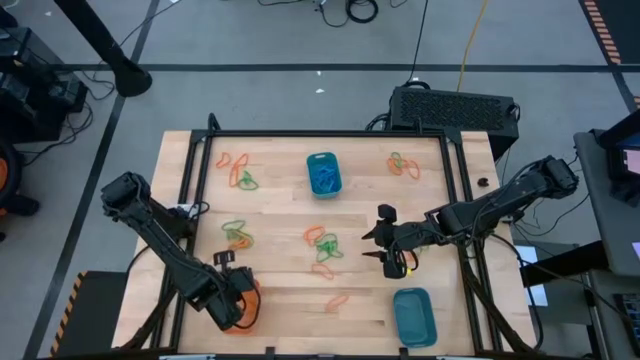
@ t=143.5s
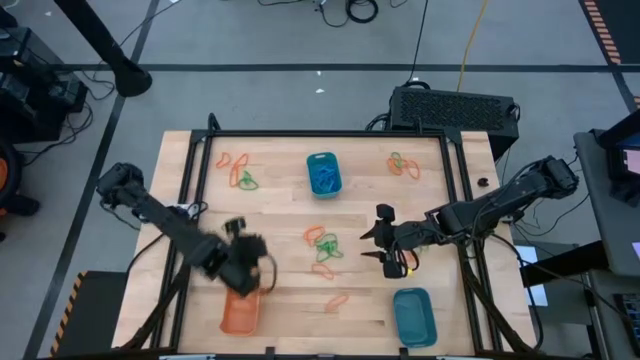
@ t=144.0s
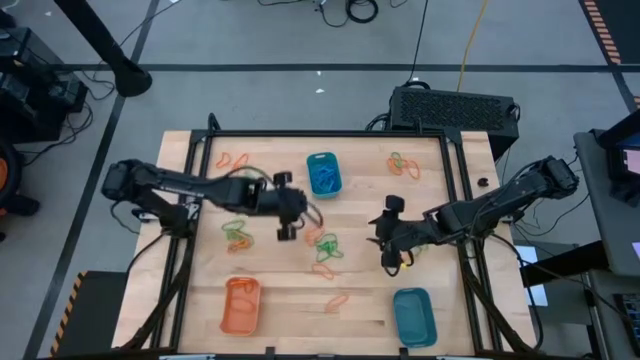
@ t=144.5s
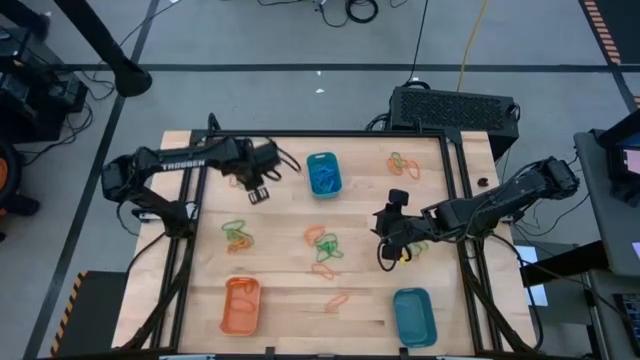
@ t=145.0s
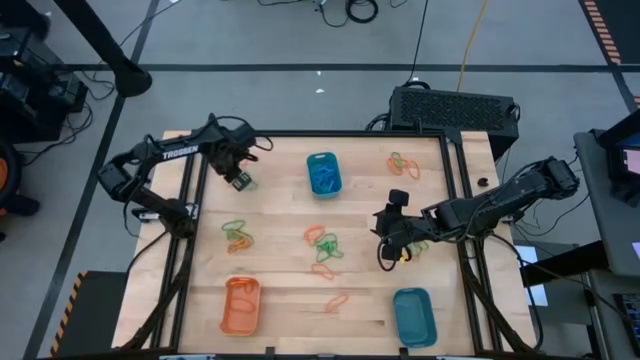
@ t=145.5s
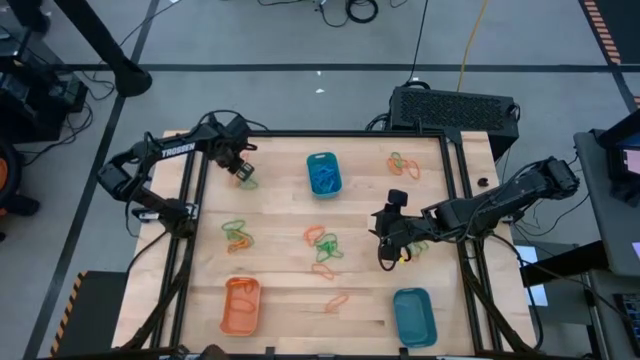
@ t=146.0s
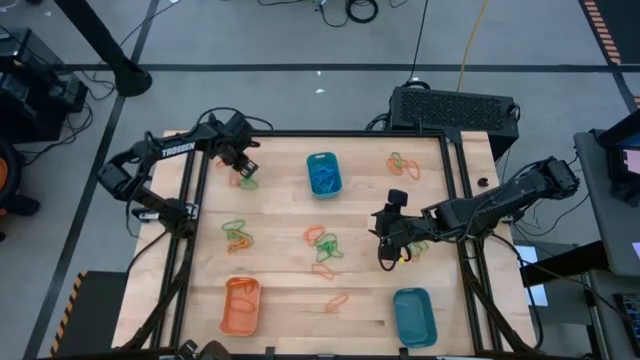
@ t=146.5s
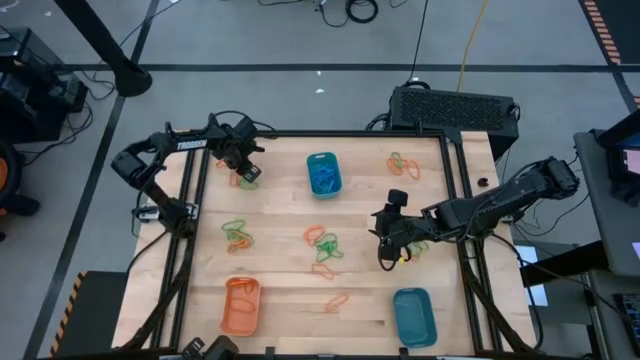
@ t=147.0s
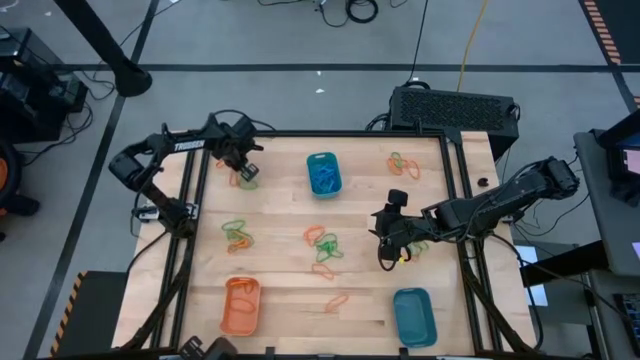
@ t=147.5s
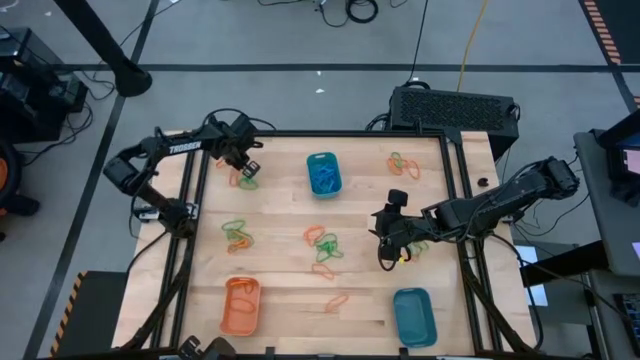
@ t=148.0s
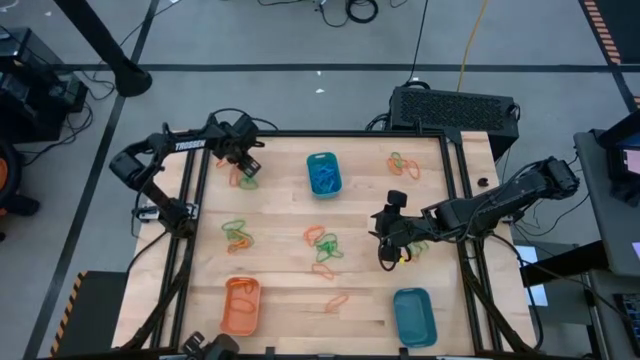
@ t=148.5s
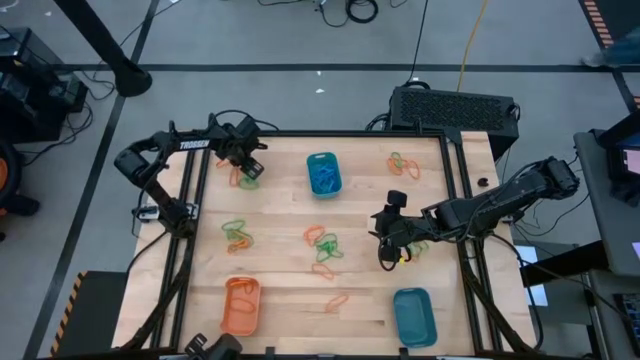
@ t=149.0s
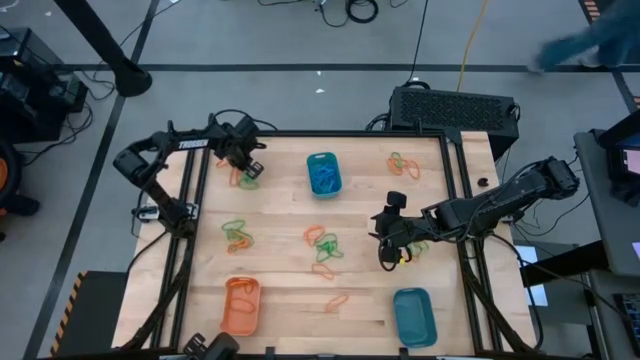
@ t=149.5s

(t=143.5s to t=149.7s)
Task: Sort rubber bands into baskets
Put the orange rubber band into the orange bin

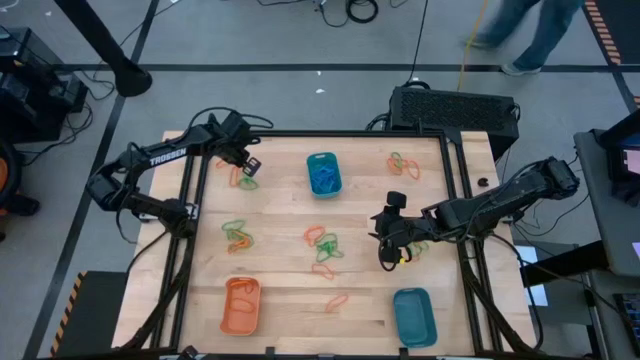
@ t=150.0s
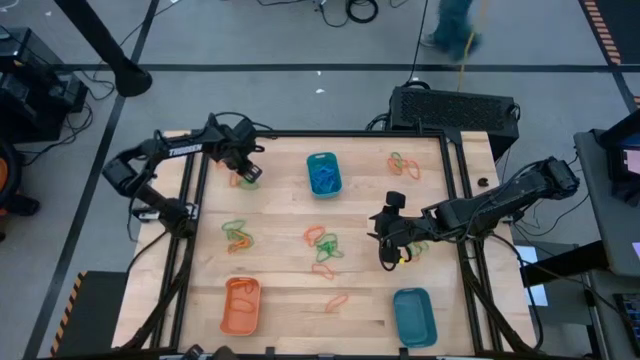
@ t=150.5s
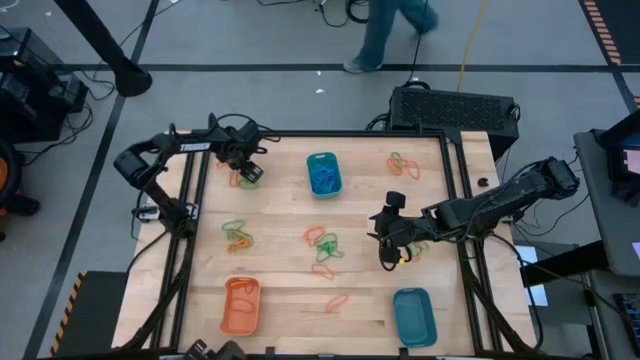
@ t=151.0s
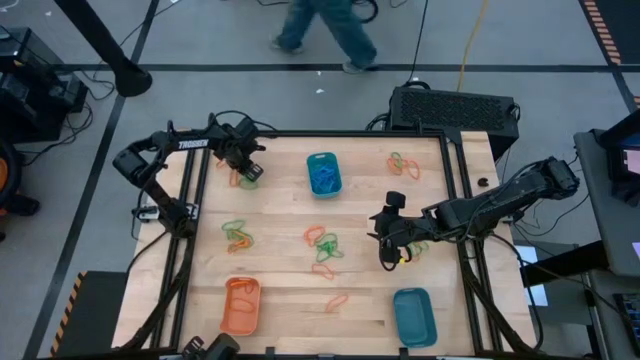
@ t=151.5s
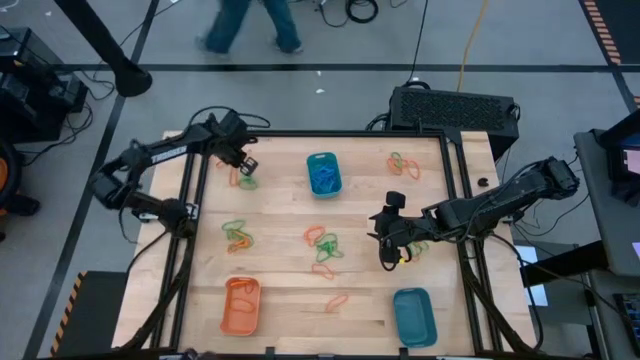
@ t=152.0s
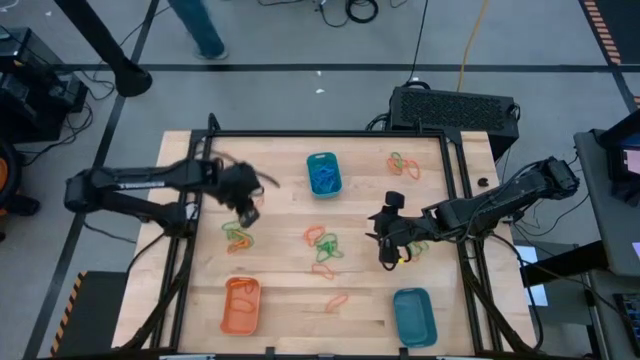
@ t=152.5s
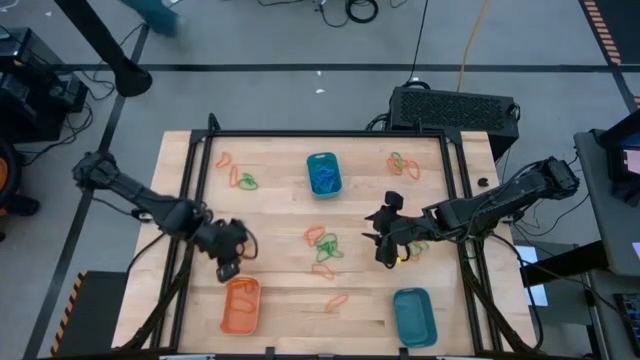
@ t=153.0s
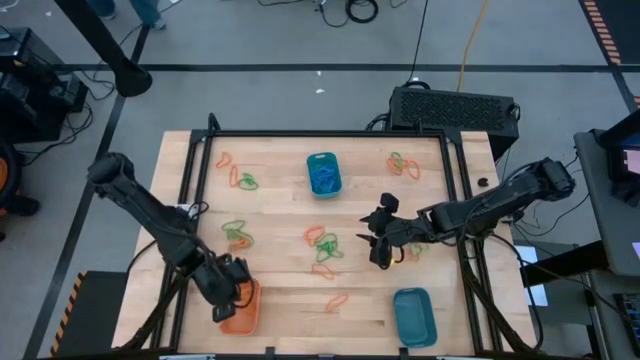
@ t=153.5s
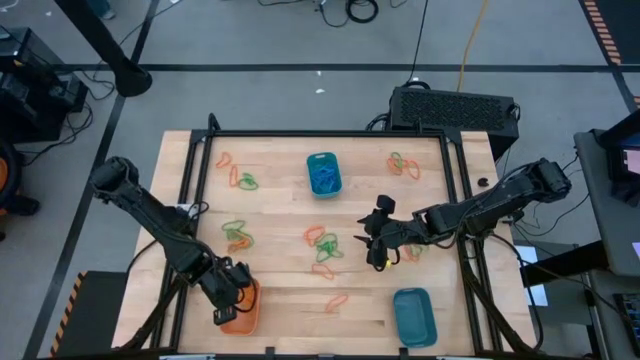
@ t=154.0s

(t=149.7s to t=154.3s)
Put the orange rubber band into the orange bin

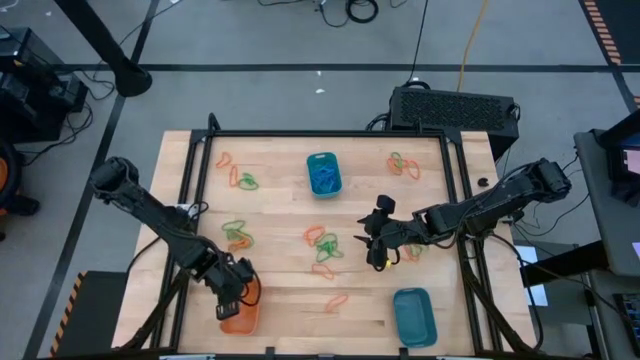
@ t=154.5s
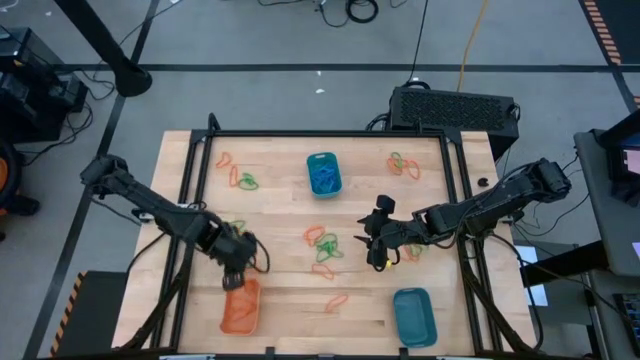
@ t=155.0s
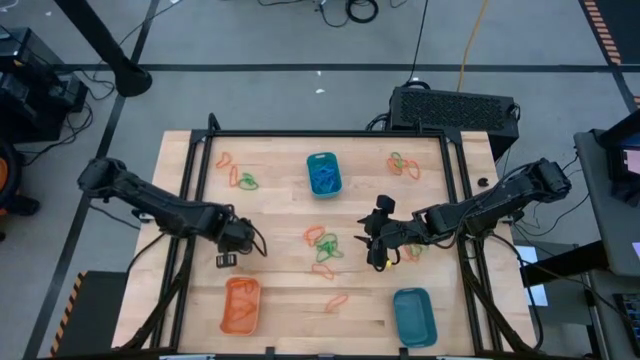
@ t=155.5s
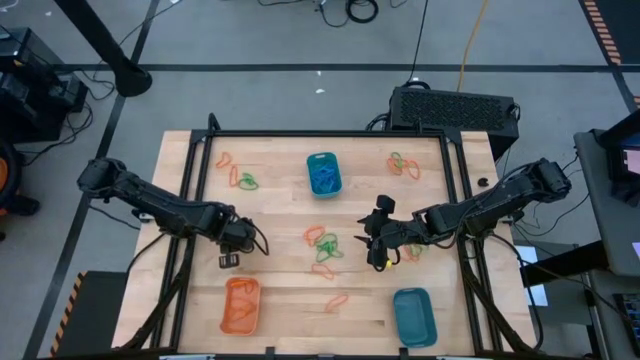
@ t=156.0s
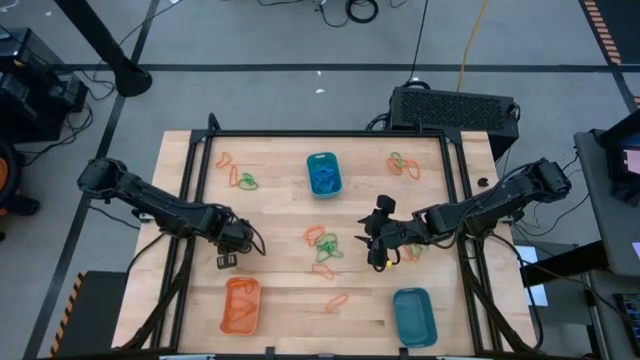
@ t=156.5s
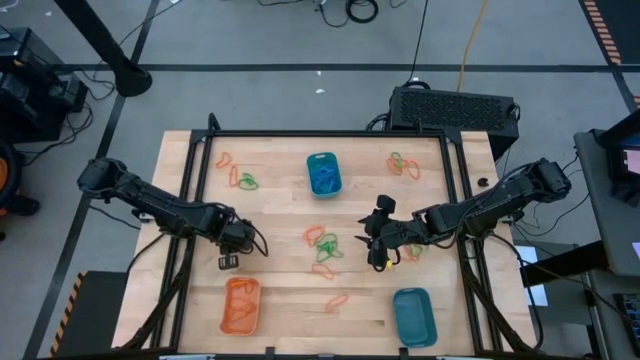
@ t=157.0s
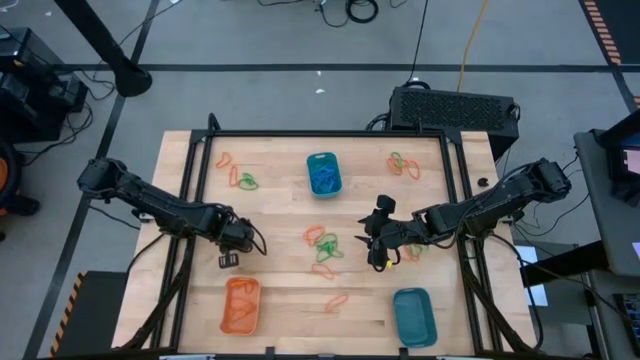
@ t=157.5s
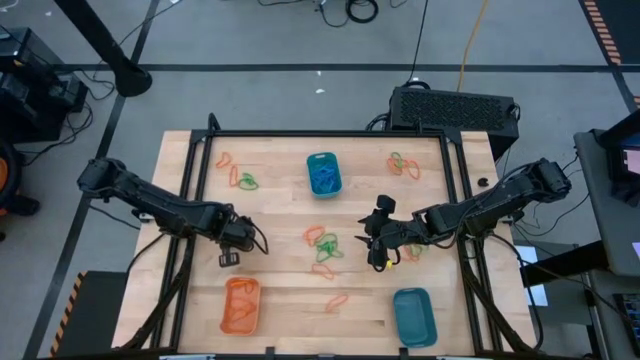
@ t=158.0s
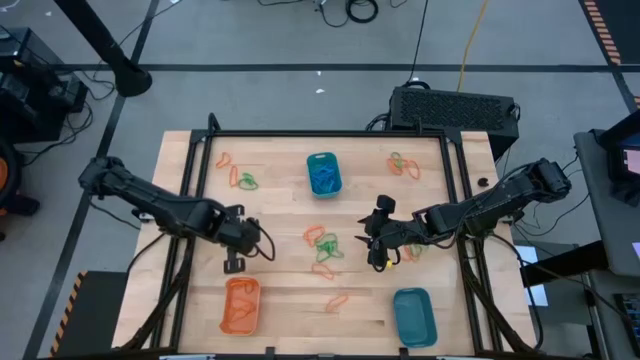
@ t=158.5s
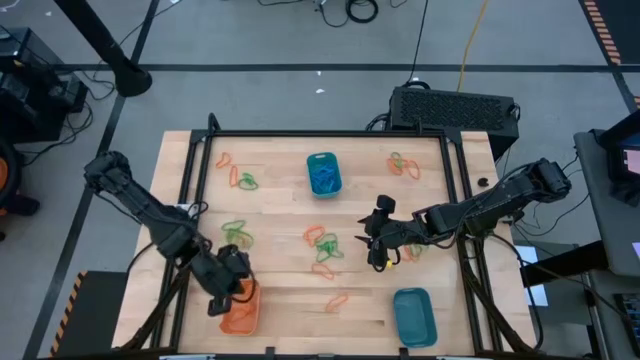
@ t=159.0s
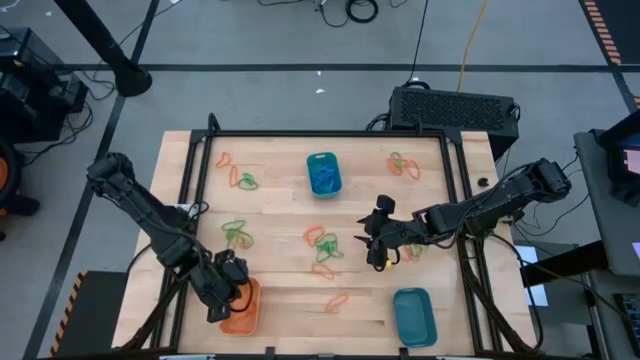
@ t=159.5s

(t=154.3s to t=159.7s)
Put the orange rubber band into the orange bin

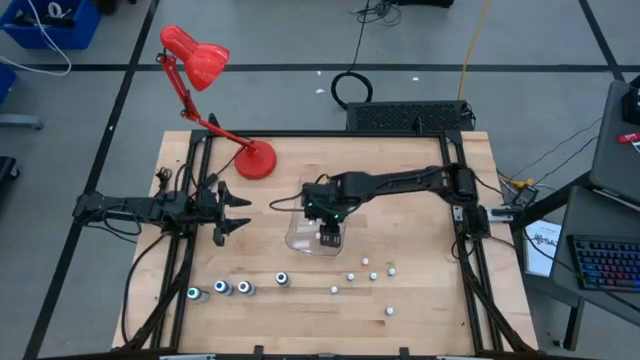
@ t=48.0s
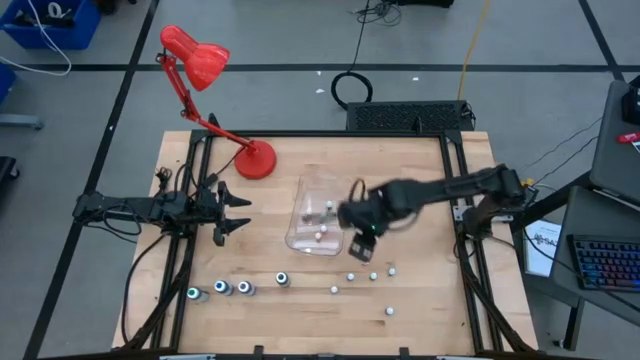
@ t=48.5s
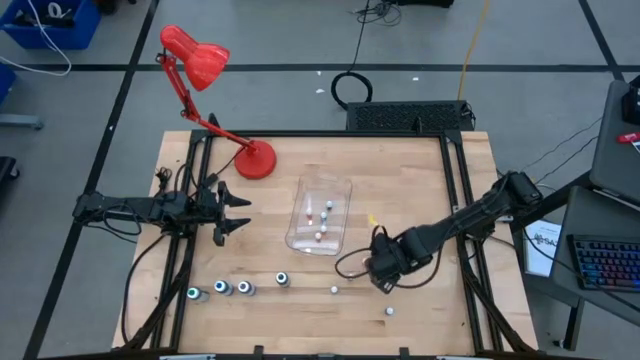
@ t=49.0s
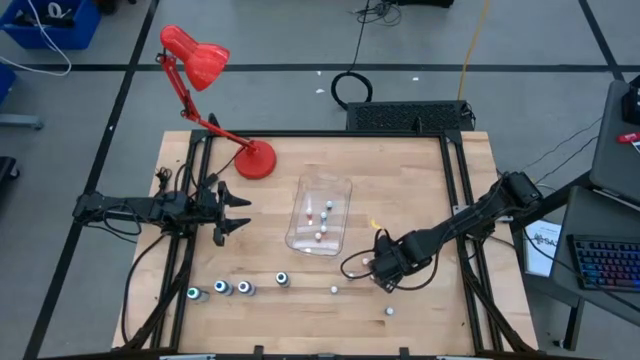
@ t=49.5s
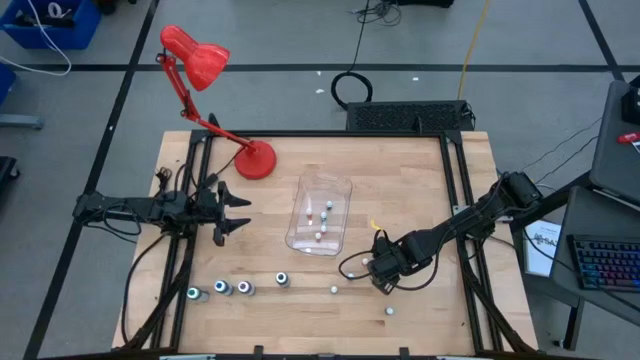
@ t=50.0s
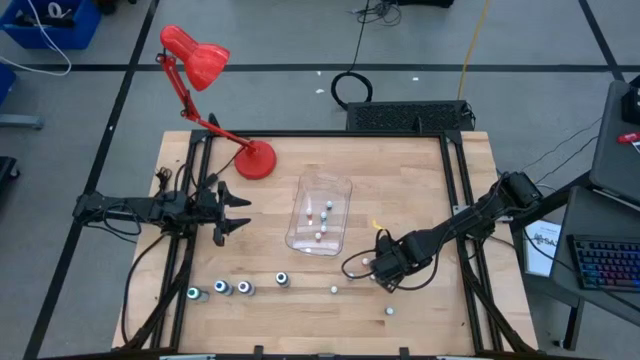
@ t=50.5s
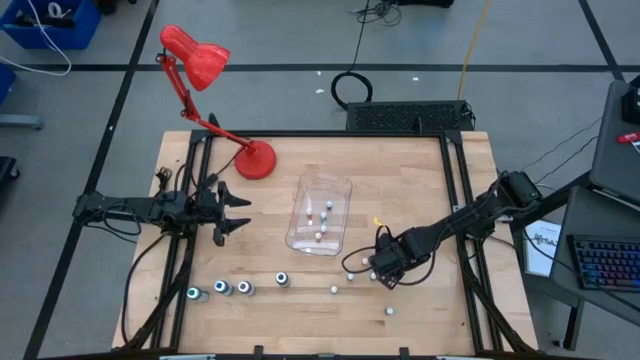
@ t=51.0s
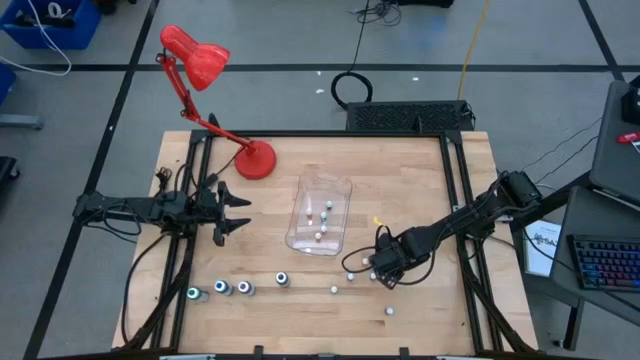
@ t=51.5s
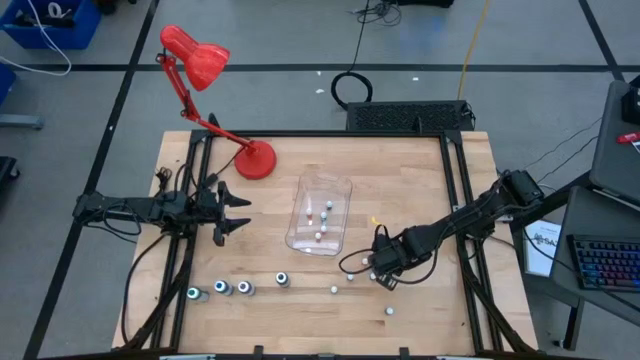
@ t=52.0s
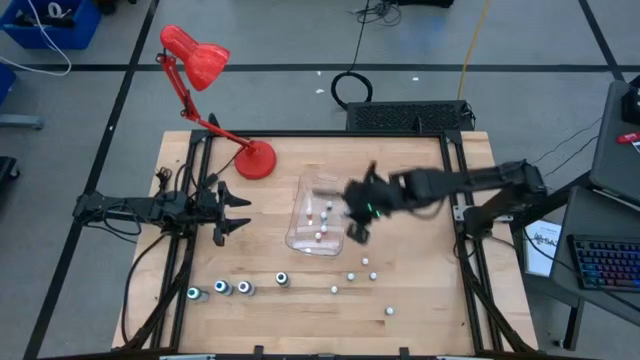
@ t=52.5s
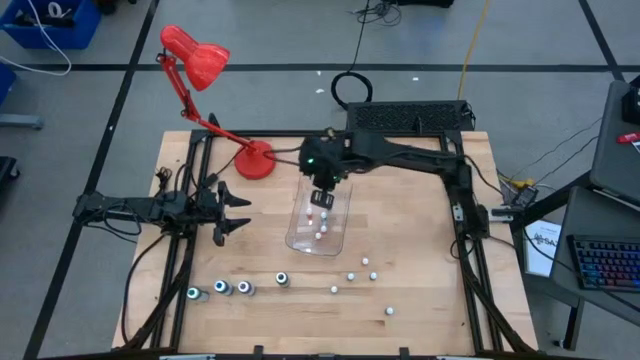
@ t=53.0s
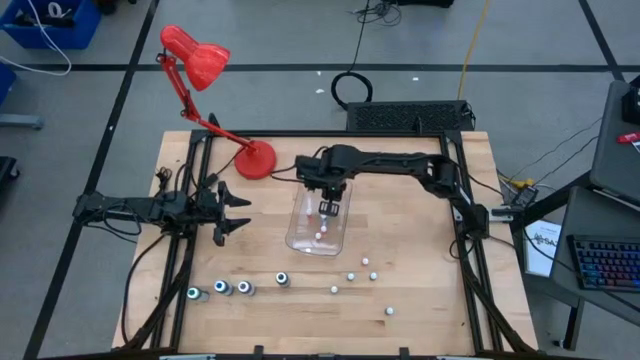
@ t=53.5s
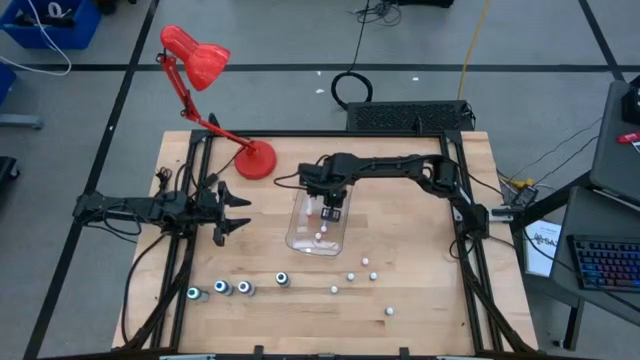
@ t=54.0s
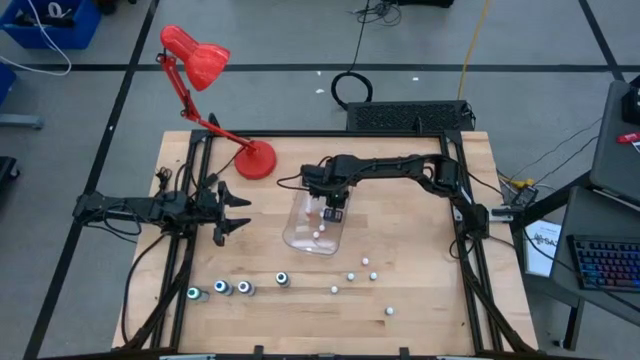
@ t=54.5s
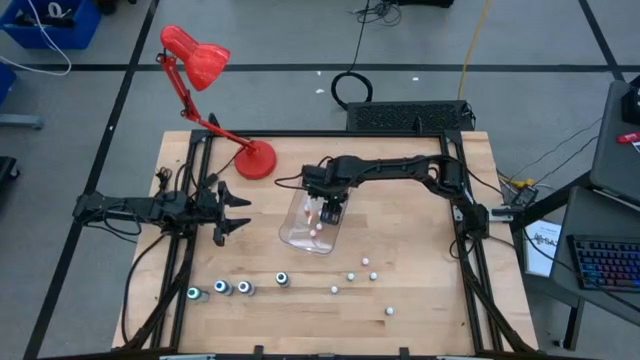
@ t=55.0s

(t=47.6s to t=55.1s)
Task: Pick & Place food coloring
Put the small blue food coloring bottle into the transparent bin
